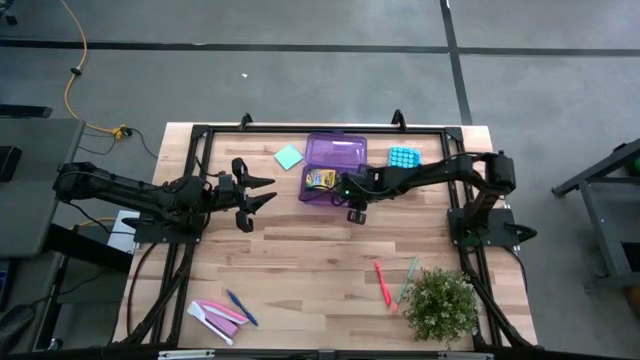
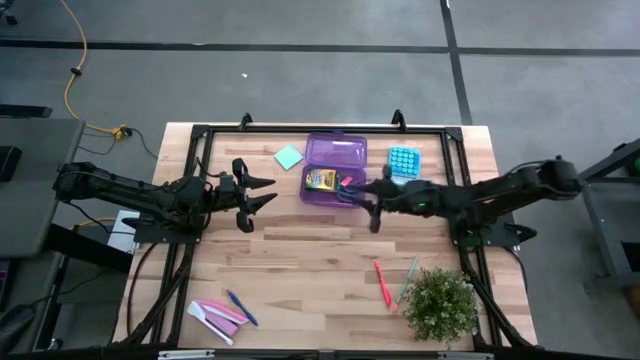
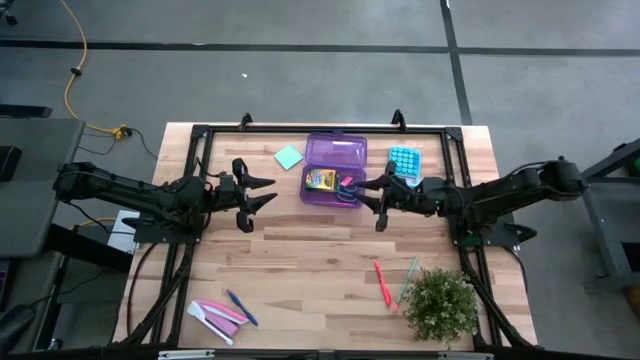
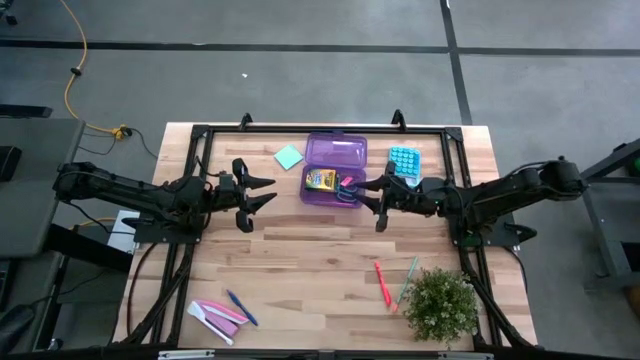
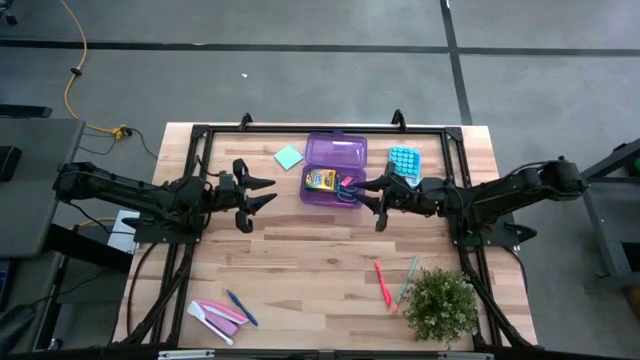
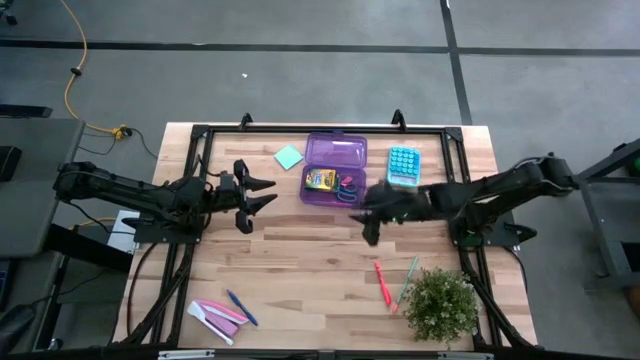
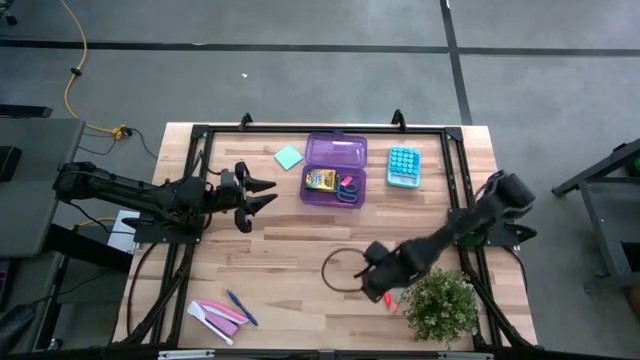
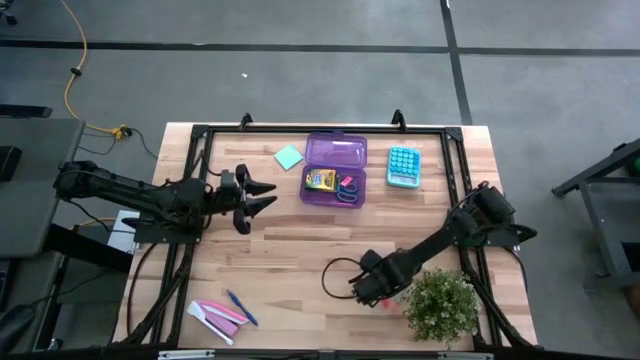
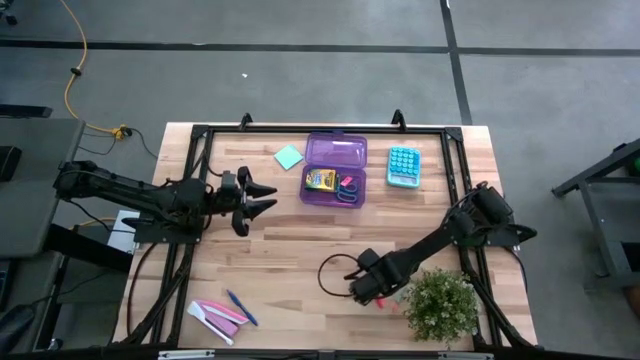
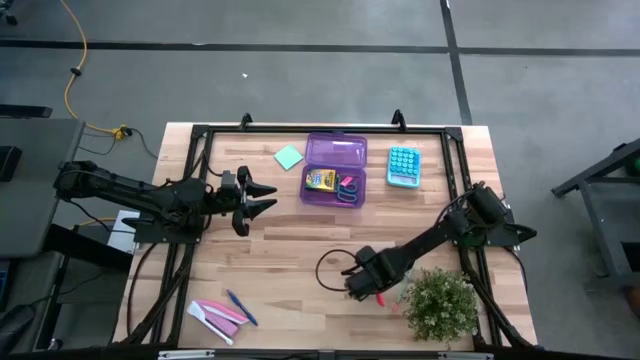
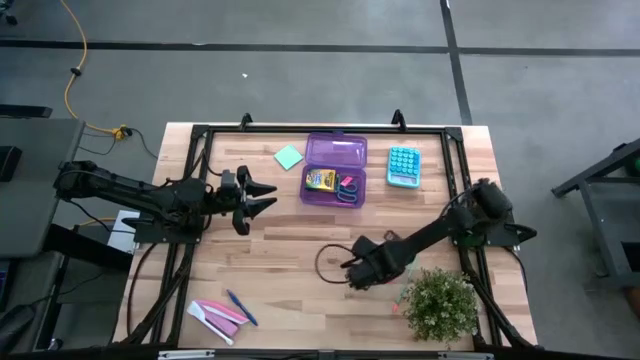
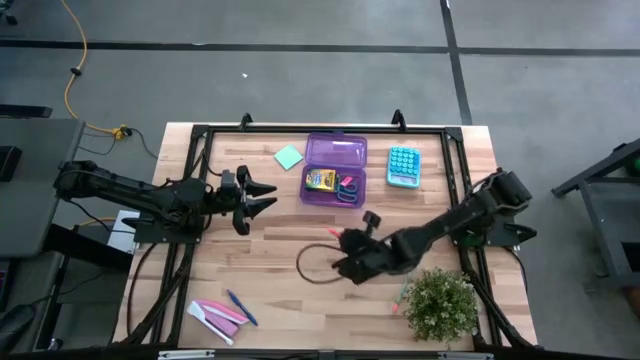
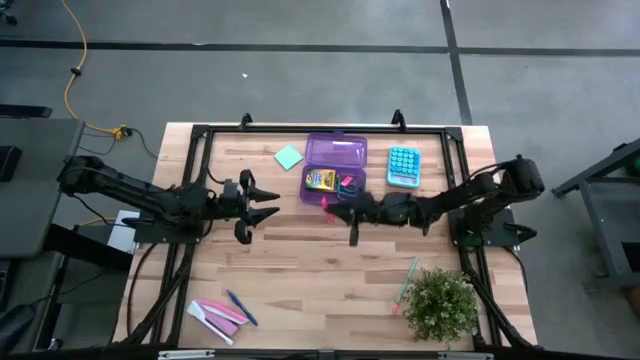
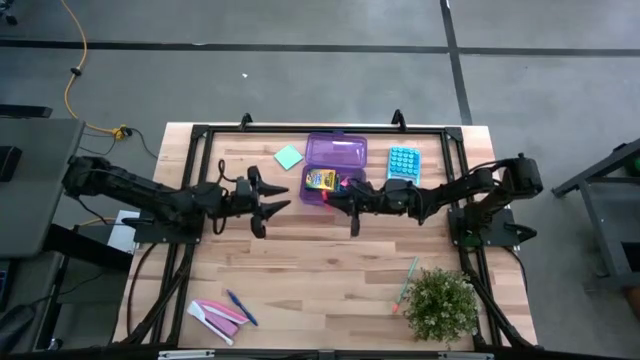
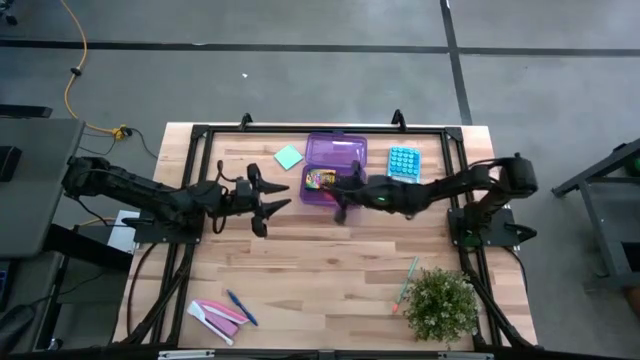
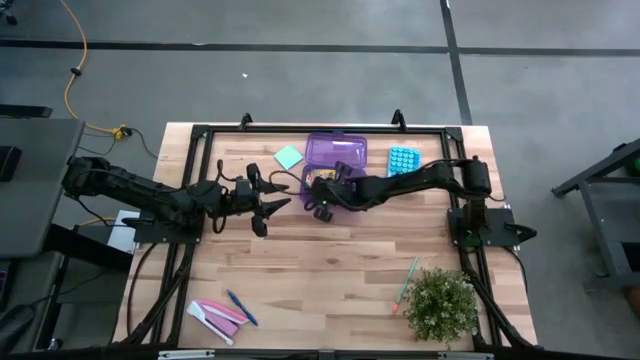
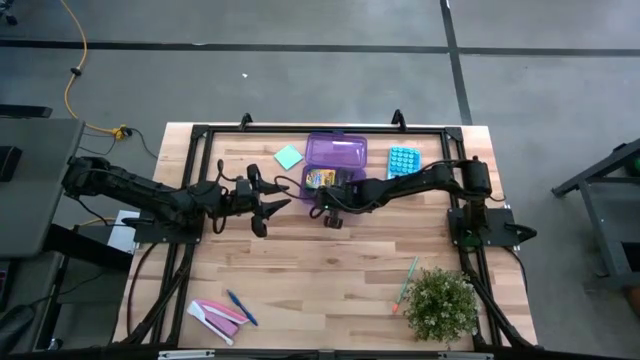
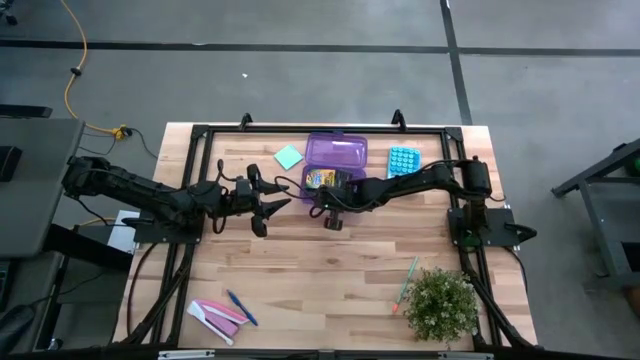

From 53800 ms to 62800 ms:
Task: Pack school essentials
Put the orange pen into the violet supply box

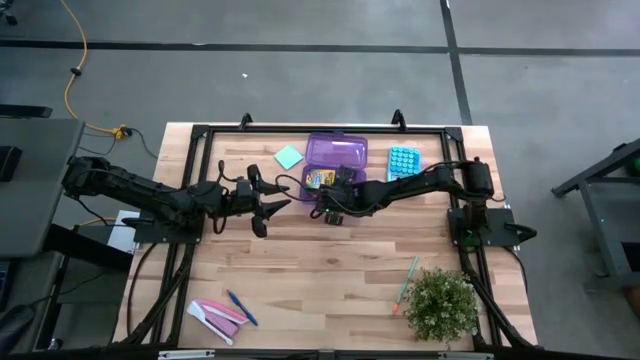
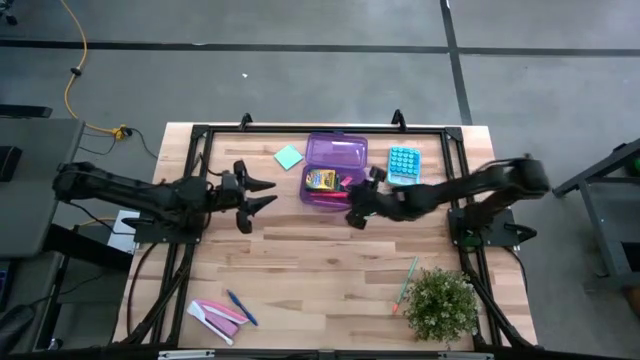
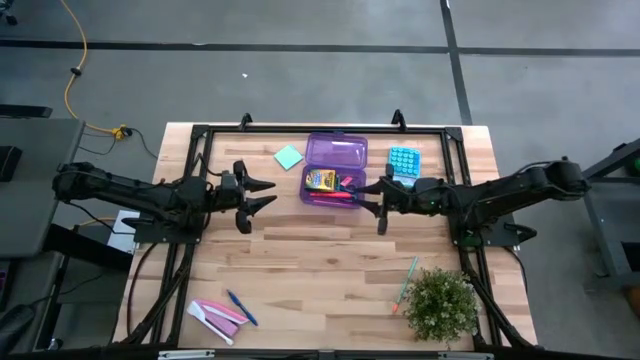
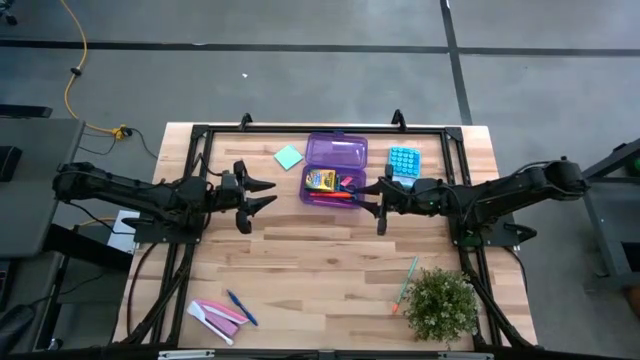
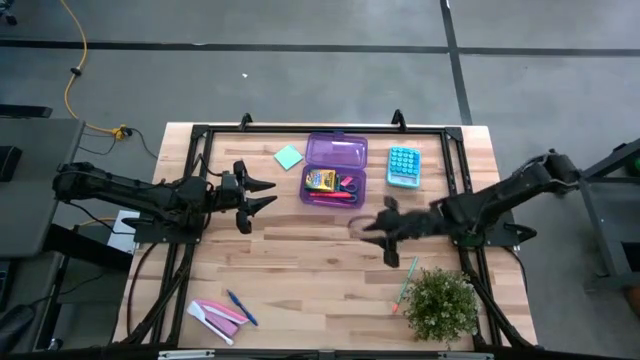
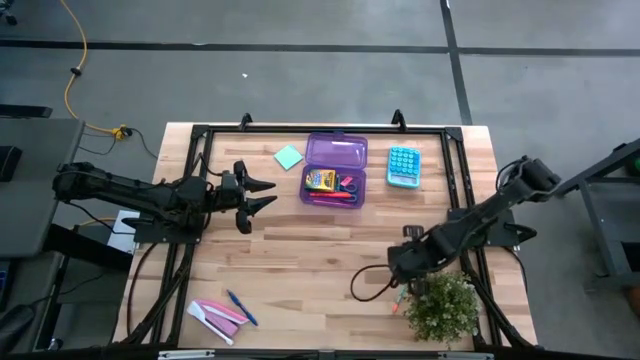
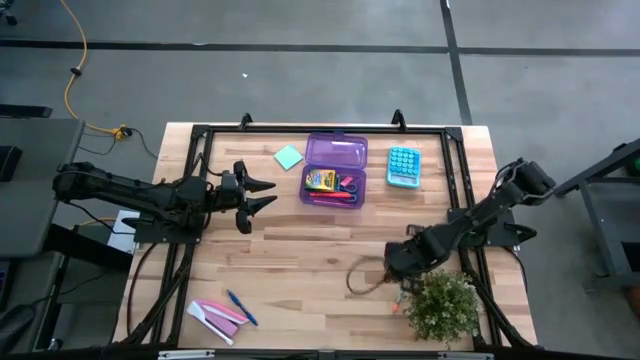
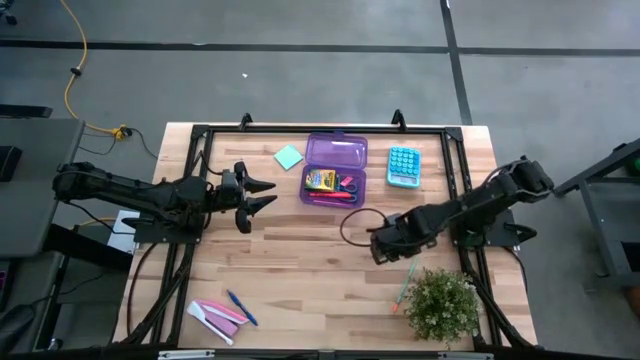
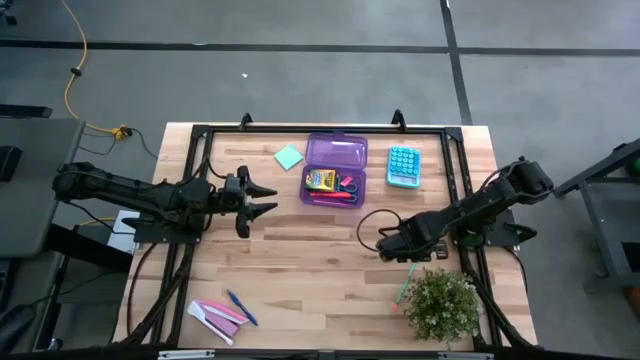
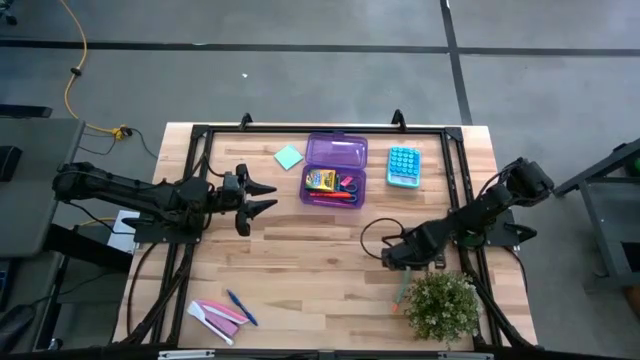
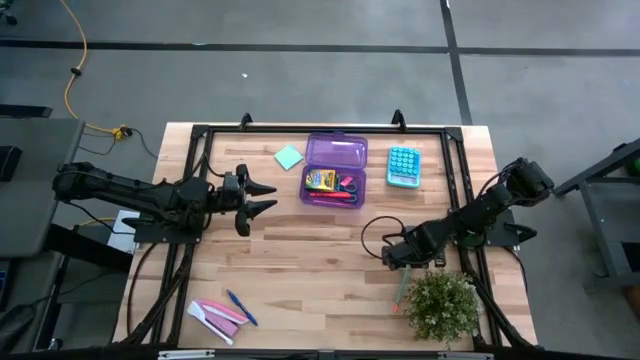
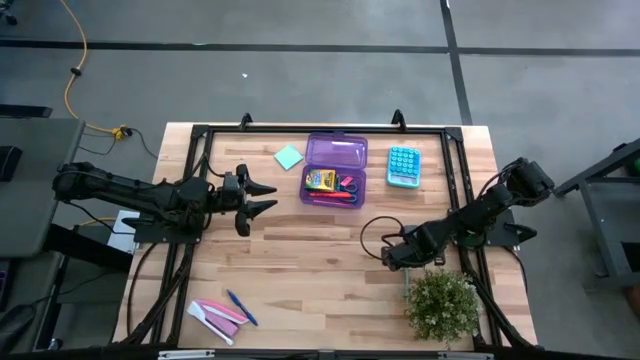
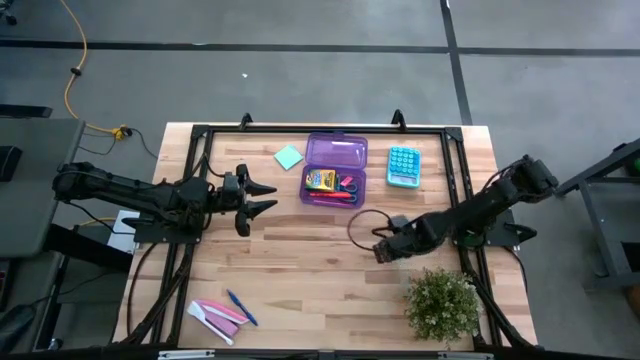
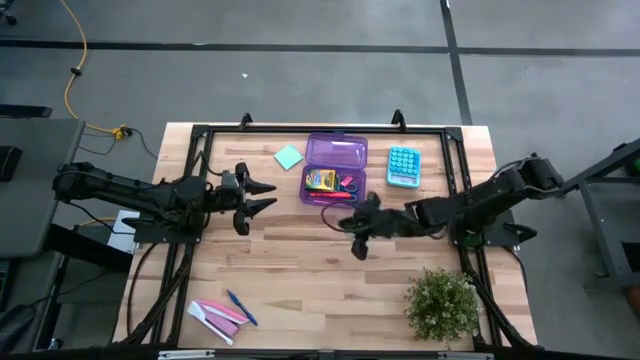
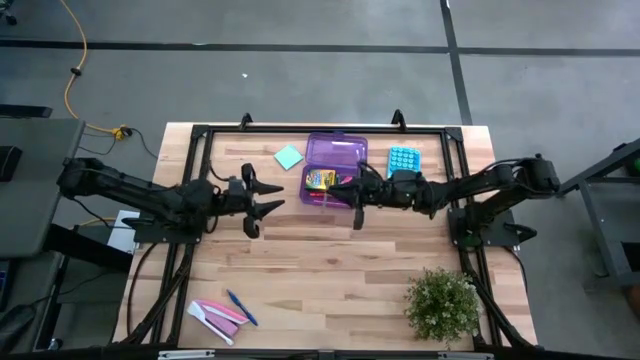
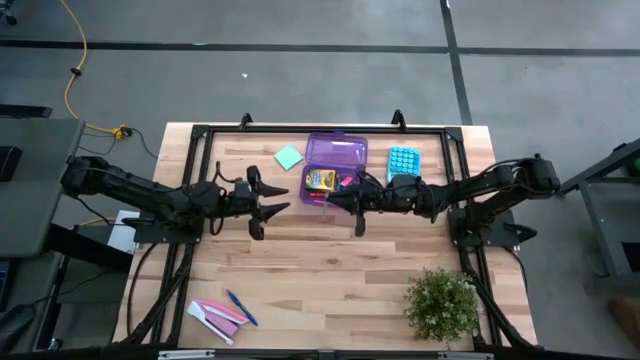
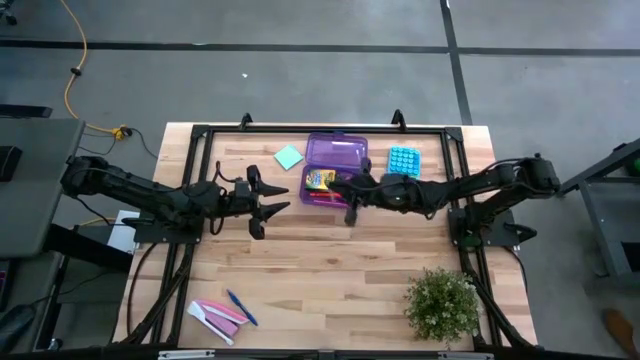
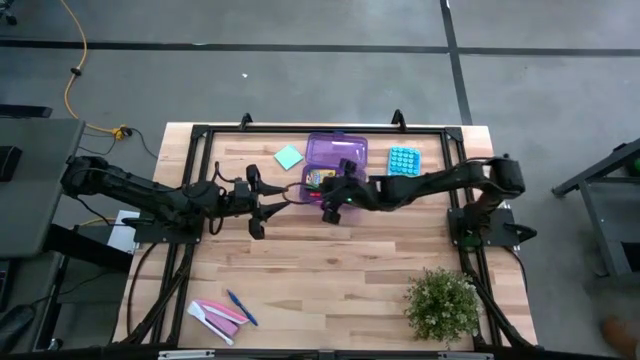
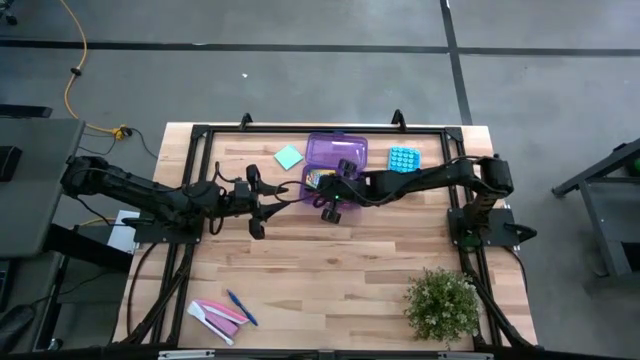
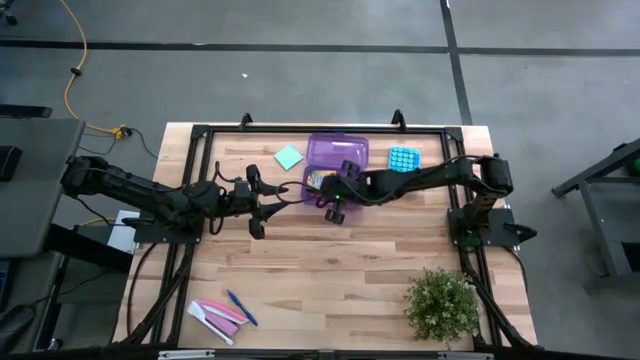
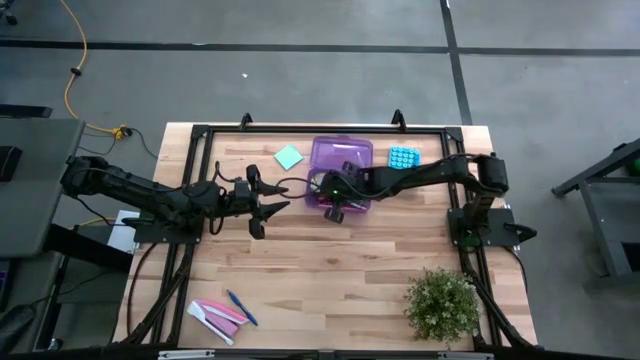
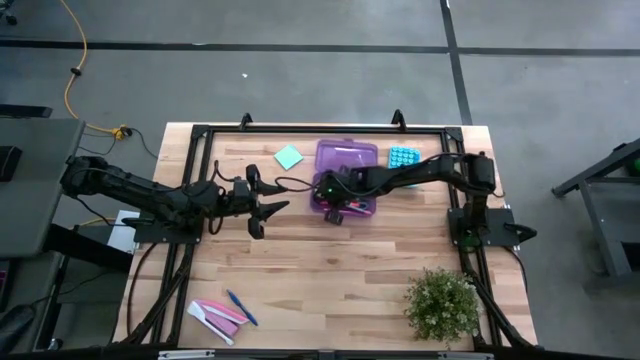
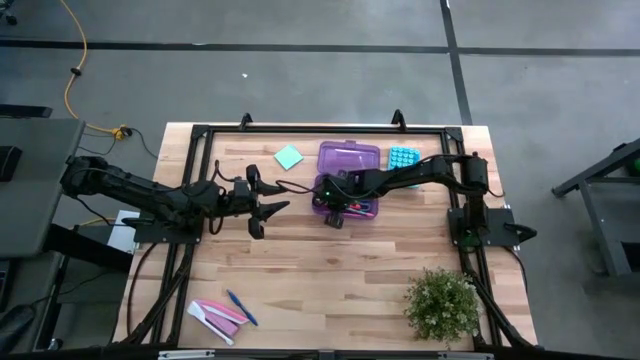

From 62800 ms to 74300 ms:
Put the light blue pencil into the violet supply box
